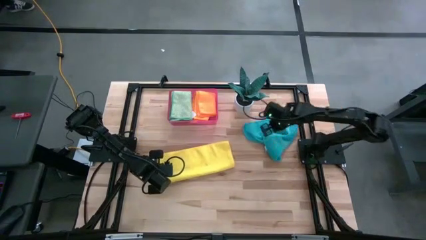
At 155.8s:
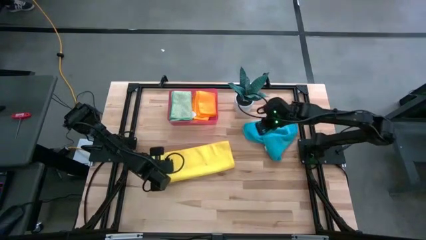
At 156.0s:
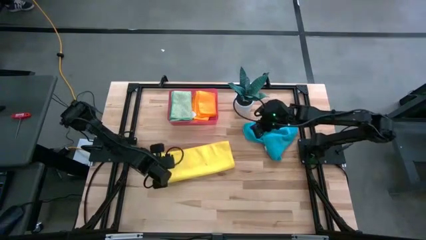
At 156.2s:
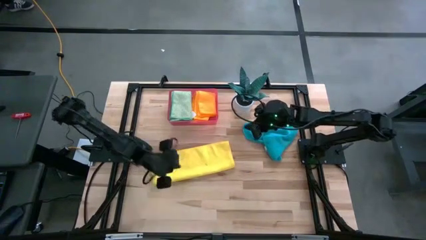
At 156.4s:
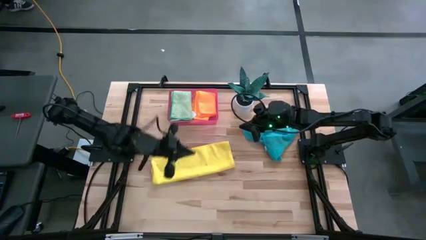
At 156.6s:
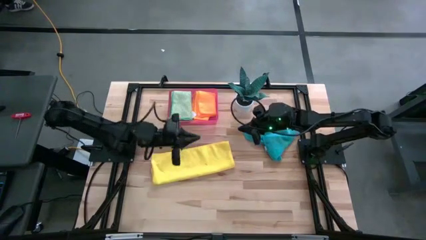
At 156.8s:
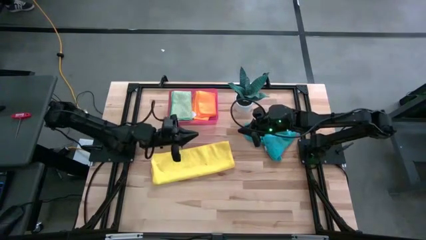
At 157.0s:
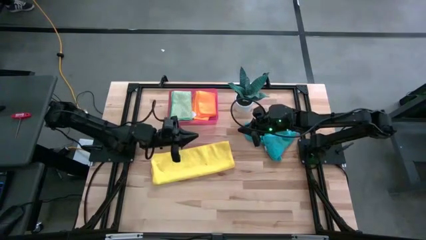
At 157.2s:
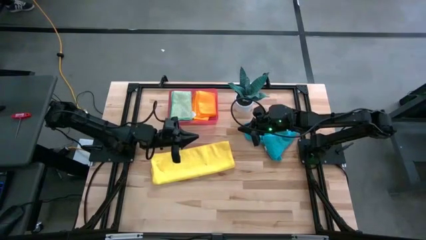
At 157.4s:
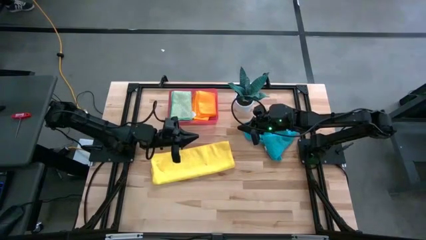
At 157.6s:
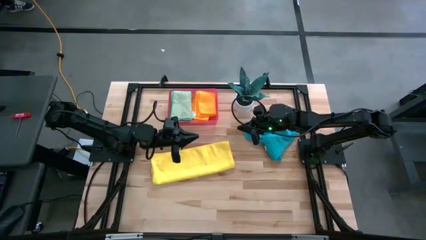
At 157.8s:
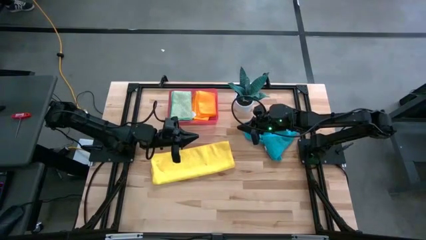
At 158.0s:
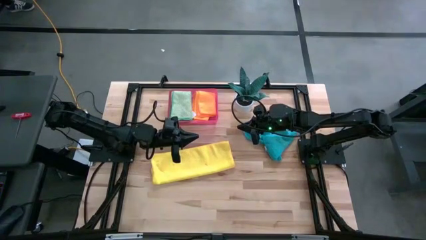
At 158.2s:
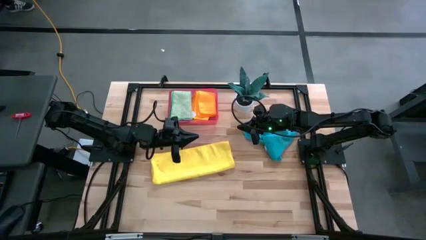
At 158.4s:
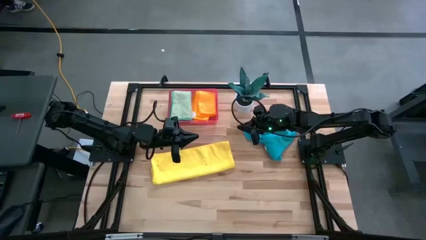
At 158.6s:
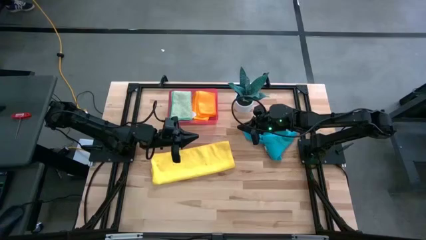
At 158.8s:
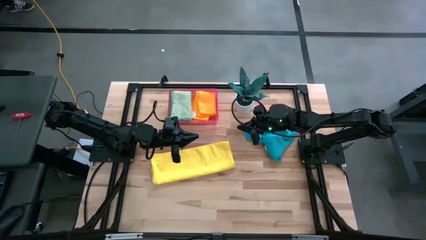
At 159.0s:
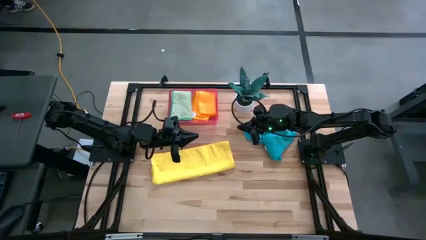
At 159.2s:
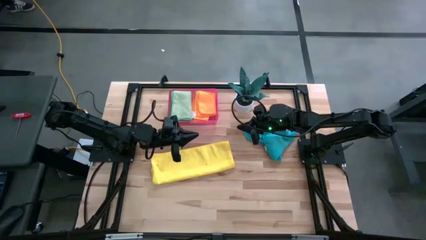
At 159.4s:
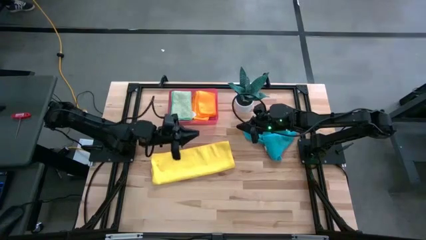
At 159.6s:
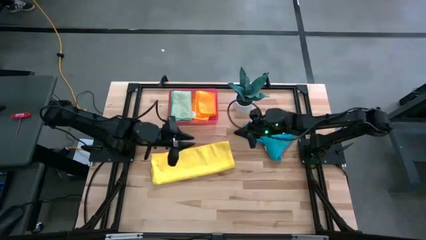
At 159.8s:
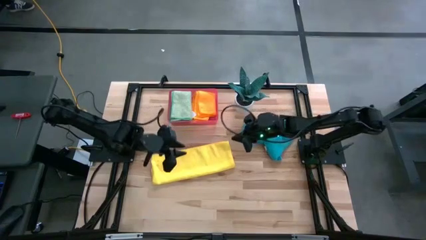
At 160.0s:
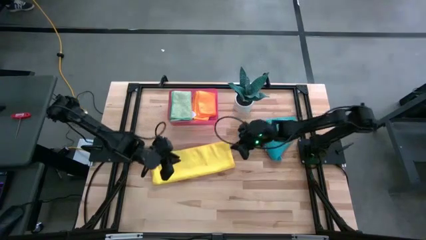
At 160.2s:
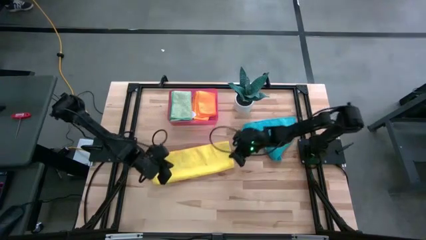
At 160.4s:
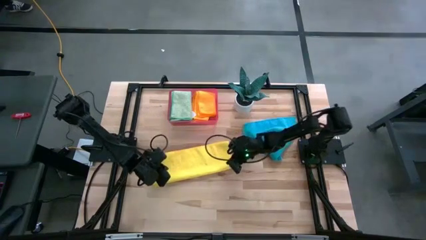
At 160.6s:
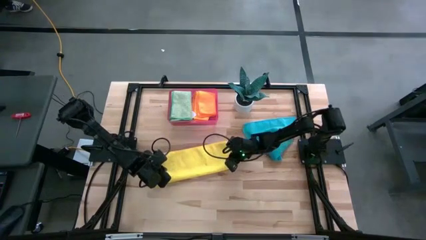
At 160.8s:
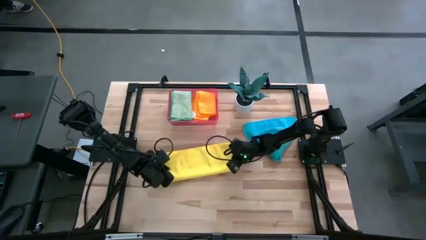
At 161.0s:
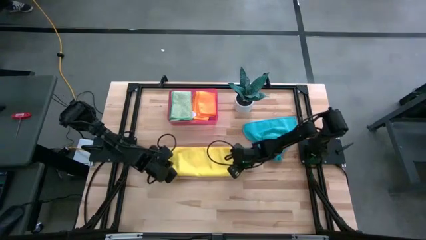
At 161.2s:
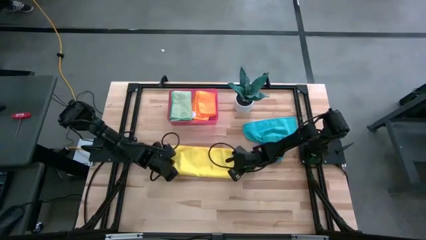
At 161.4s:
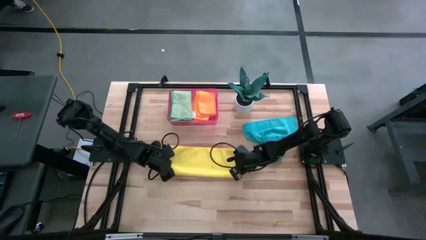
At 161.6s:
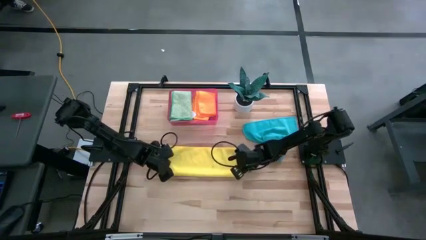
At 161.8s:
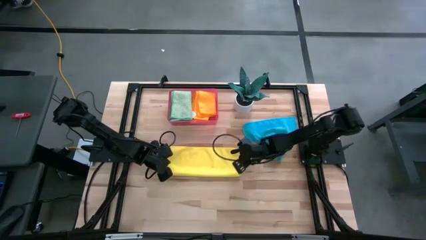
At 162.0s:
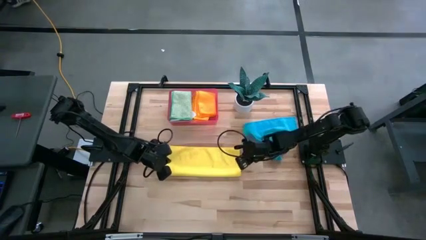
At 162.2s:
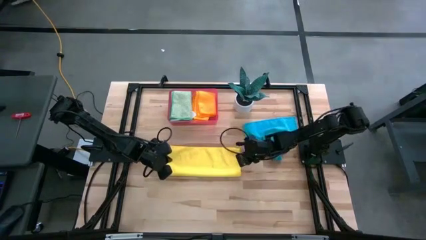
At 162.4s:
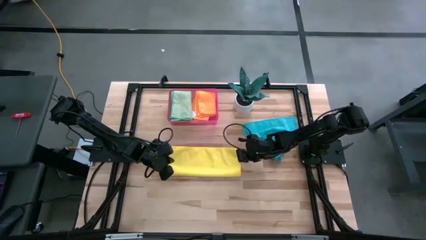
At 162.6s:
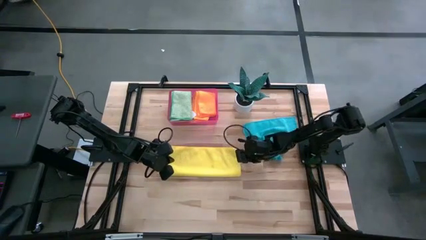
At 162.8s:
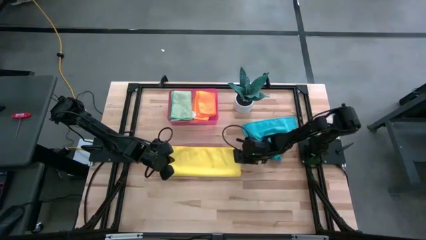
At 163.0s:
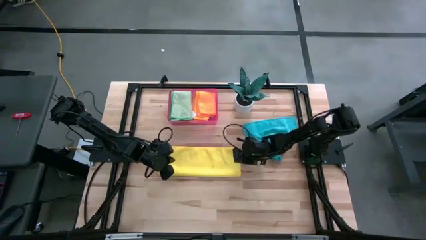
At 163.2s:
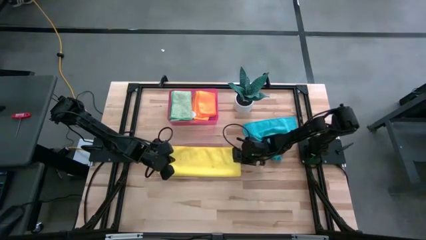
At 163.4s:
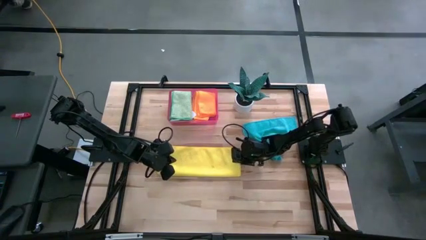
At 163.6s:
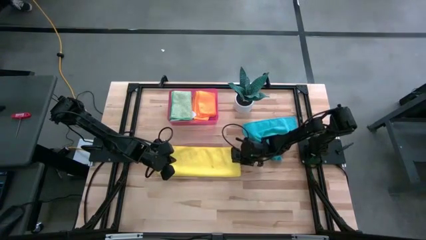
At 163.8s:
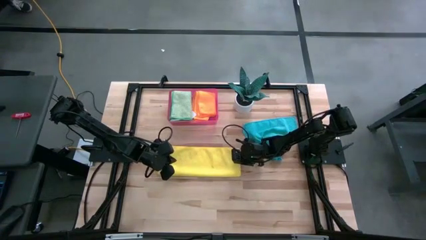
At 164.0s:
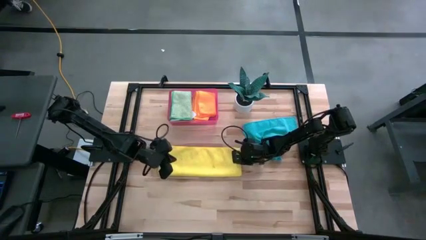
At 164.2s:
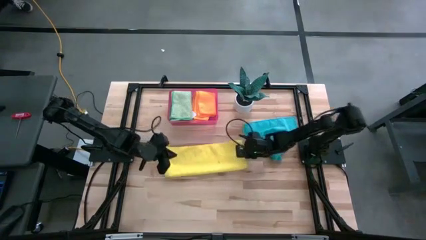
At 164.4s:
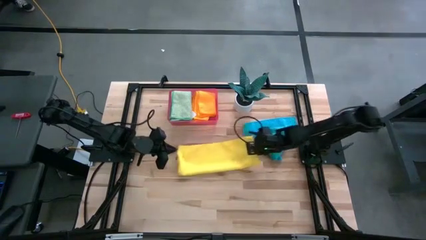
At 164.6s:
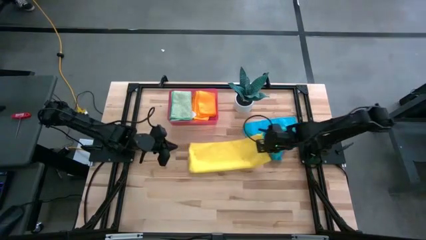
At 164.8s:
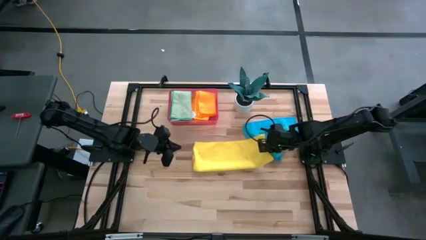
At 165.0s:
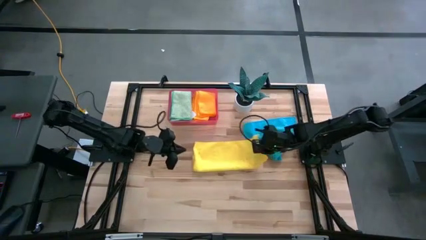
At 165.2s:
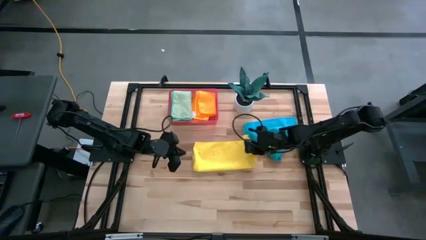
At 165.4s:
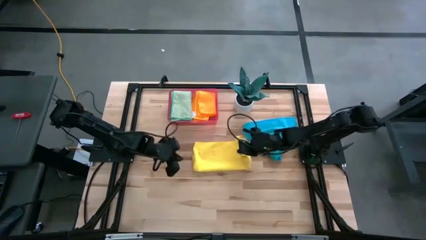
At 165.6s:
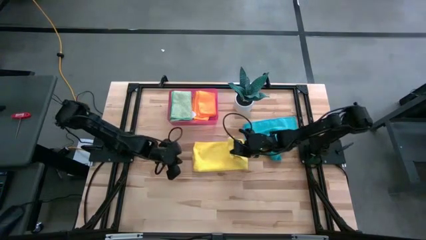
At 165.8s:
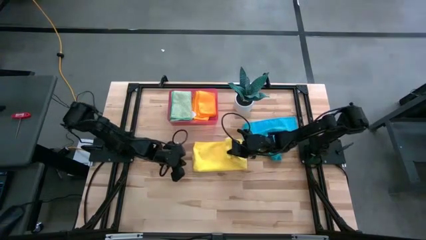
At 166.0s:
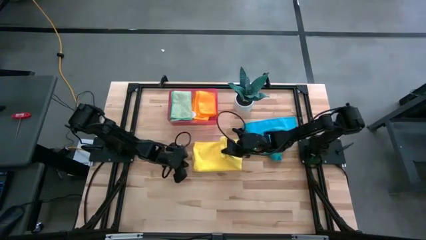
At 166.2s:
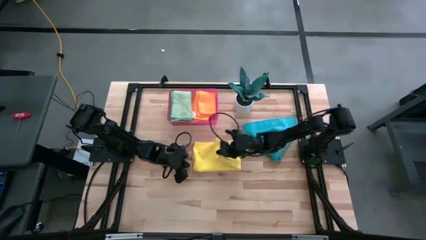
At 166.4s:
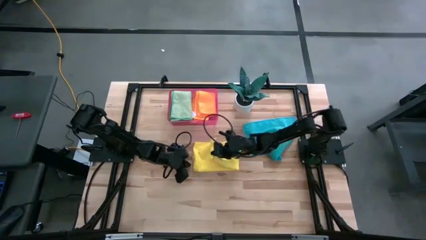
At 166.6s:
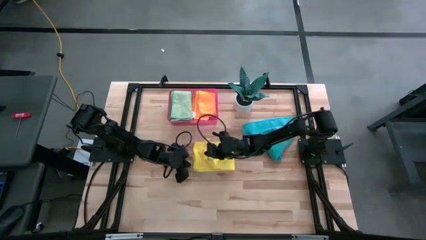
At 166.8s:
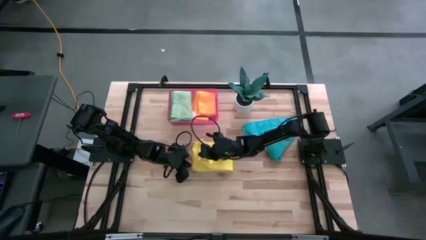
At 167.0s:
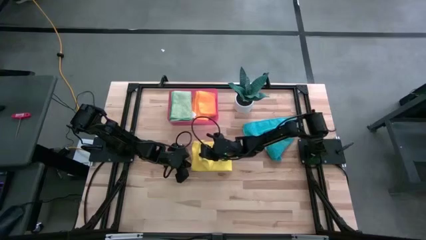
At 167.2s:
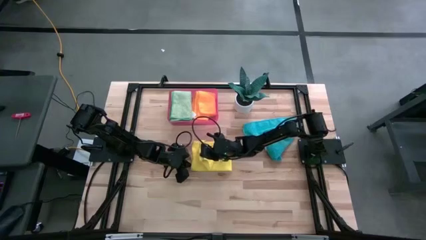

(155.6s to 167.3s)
Task: Fold microfiber towels
Fold the yellow microfiber towel

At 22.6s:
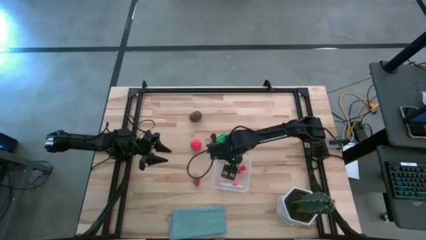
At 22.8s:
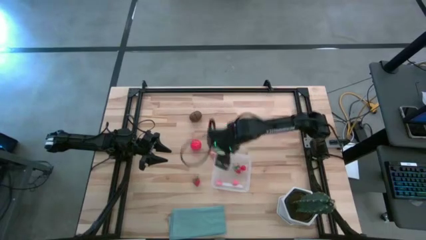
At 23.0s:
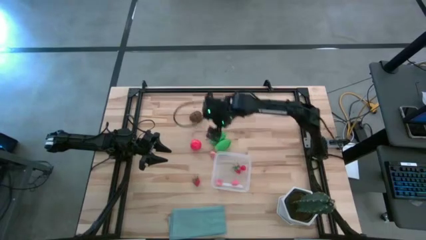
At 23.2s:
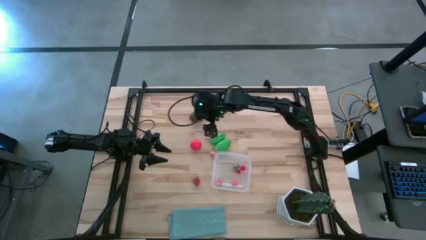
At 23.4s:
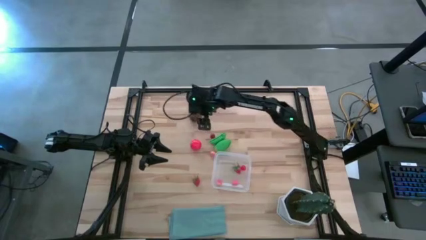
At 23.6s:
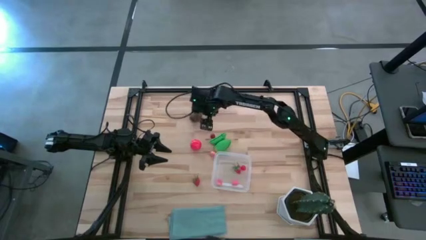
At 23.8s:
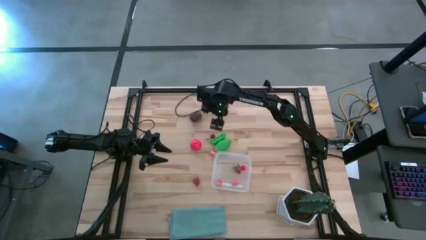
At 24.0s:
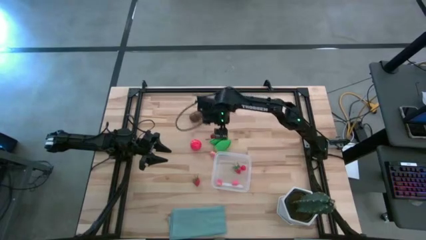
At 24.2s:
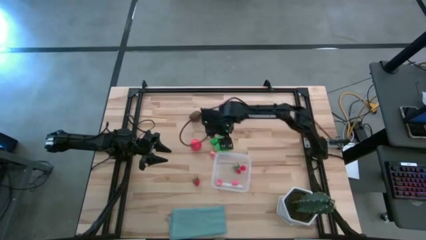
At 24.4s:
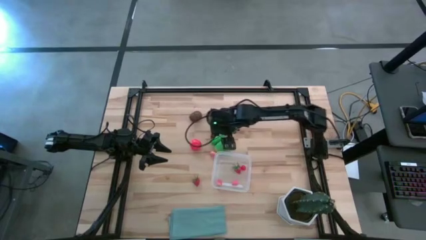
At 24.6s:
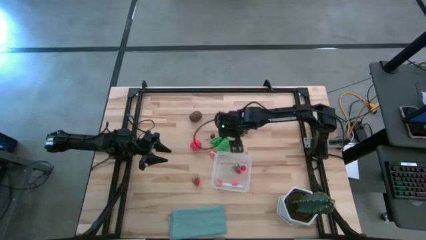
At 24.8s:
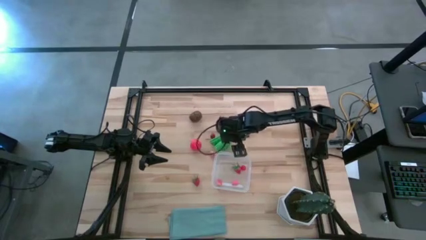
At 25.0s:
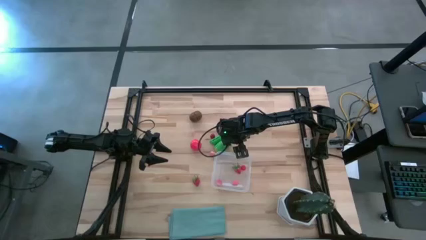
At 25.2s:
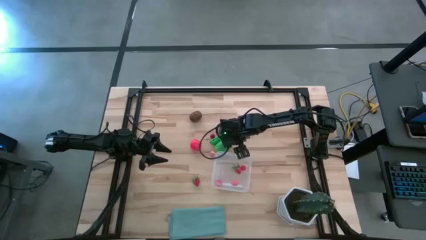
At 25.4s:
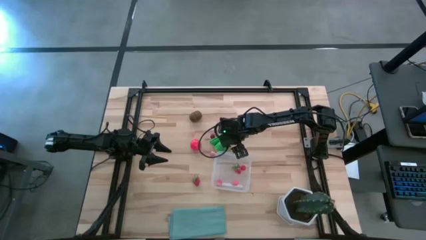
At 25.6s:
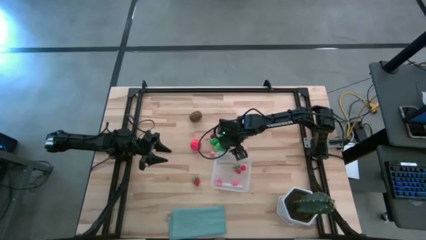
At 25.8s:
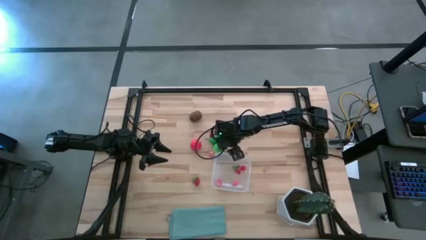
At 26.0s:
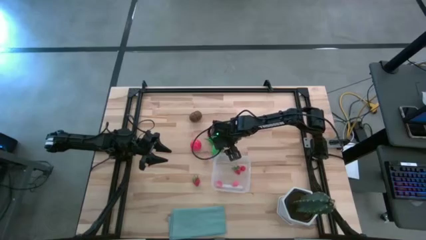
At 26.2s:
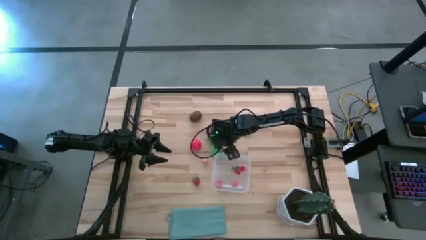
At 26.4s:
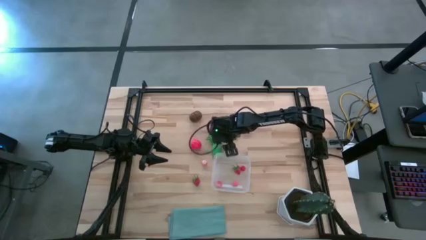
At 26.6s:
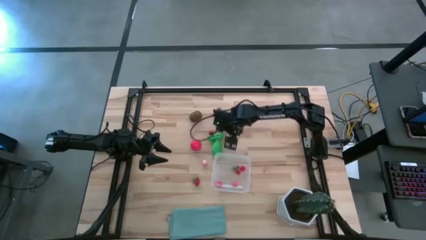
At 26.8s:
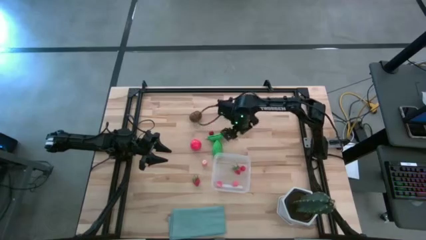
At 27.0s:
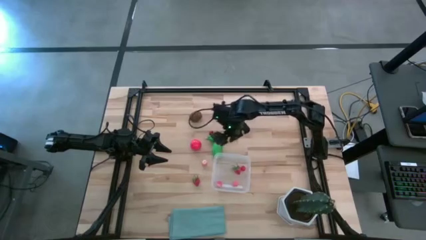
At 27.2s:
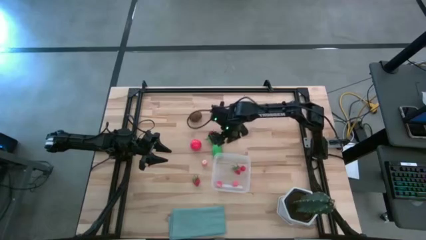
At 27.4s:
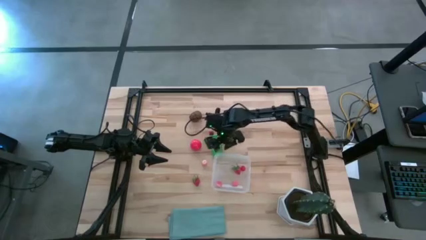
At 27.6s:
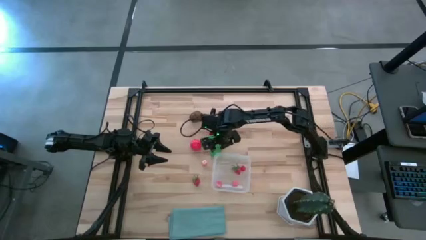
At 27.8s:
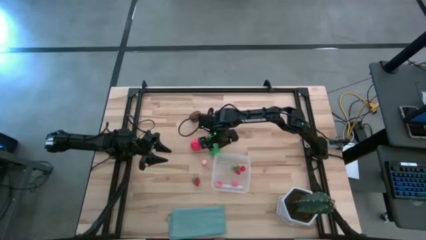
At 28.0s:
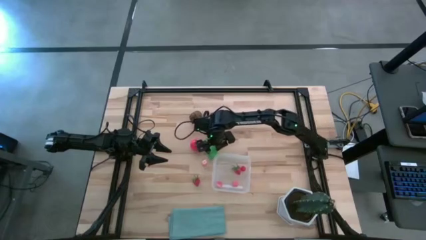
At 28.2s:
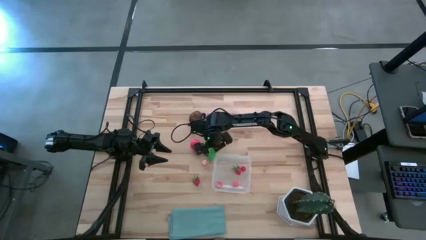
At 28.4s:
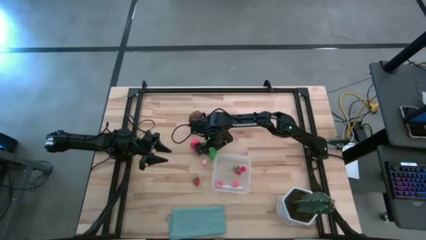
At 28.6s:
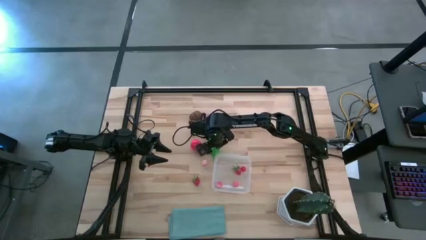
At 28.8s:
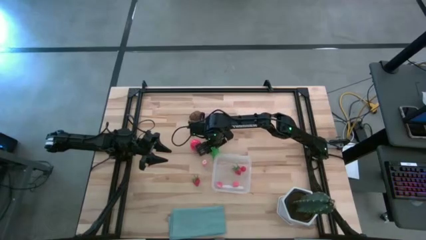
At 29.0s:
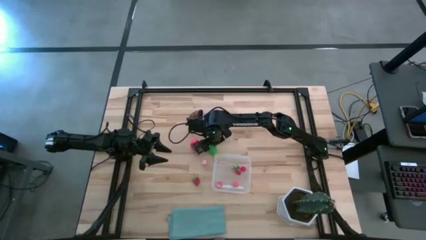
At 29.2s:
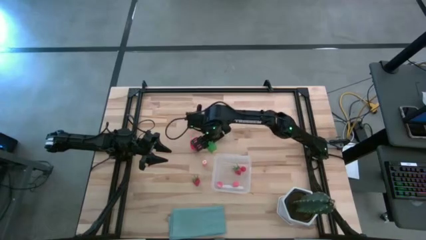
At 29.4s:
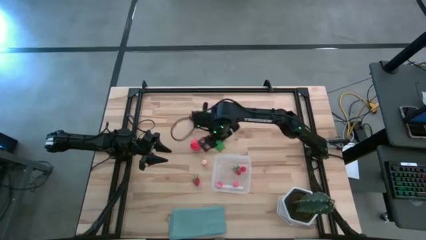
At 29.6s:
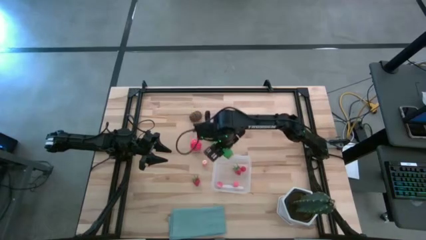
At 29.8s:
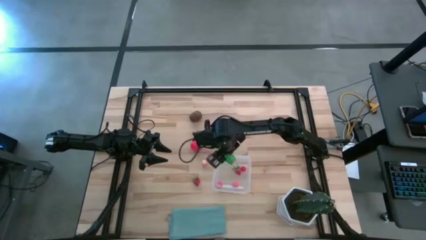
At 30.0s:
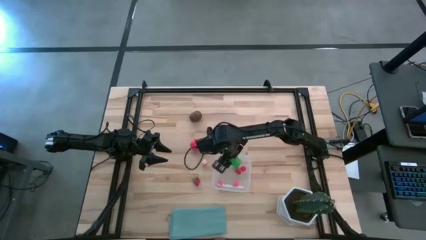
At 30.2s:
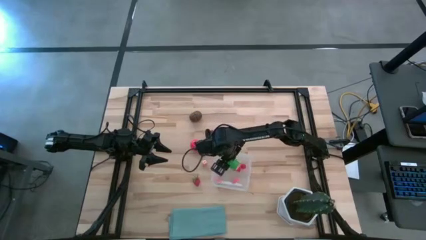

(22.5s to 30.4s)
Task: Pick and placing Produce into tupperware
Put the corn into the transparent container
